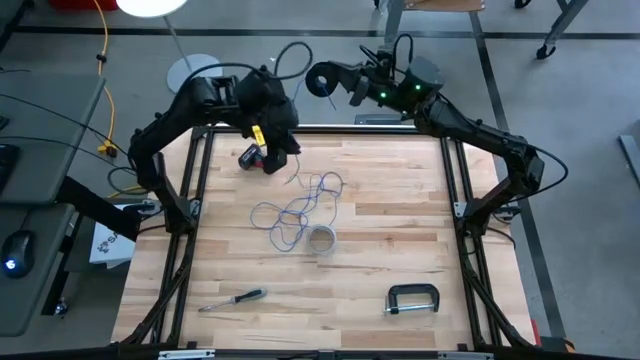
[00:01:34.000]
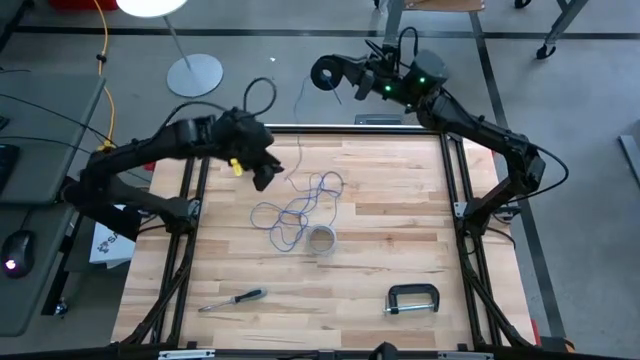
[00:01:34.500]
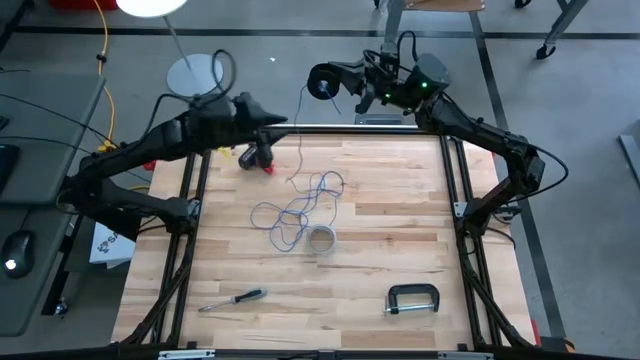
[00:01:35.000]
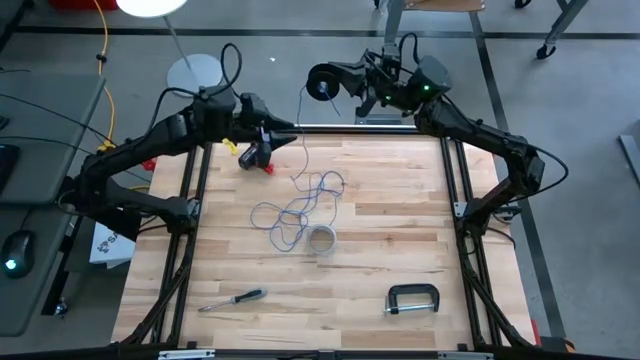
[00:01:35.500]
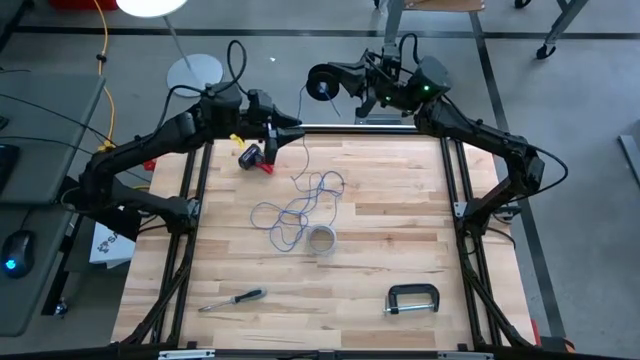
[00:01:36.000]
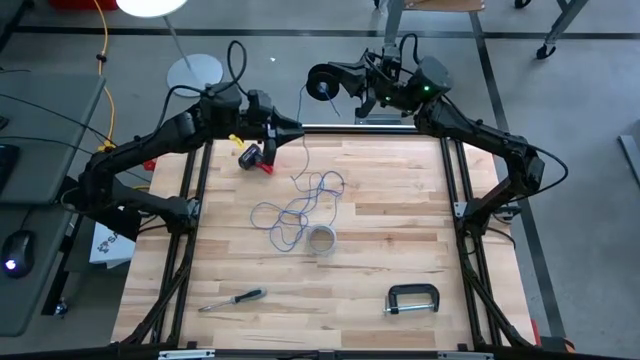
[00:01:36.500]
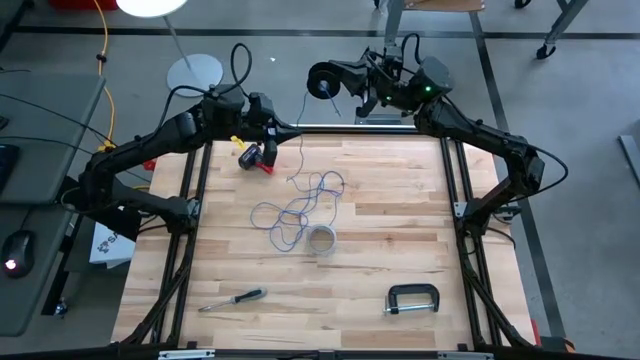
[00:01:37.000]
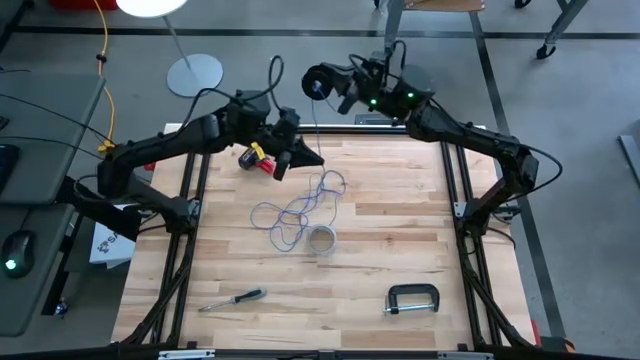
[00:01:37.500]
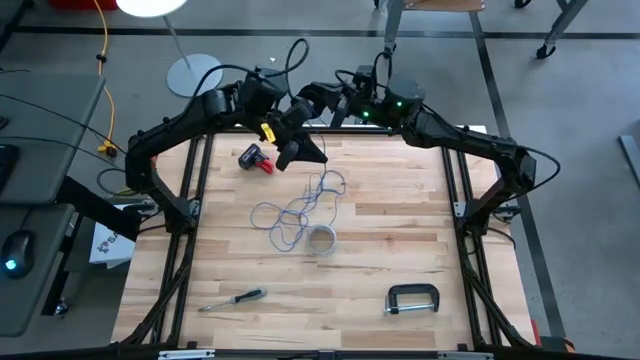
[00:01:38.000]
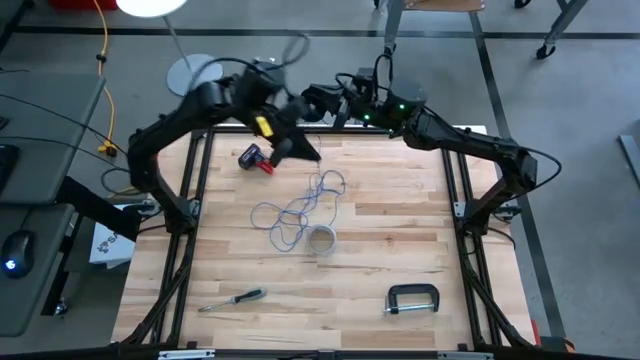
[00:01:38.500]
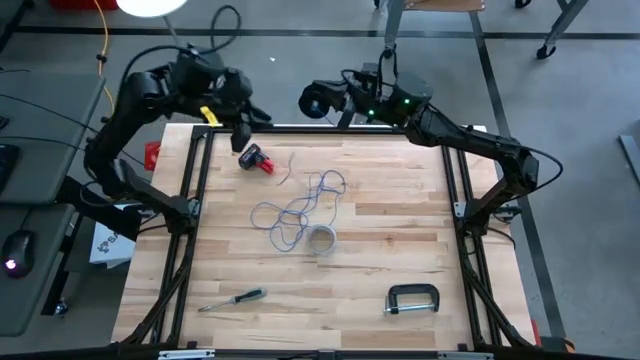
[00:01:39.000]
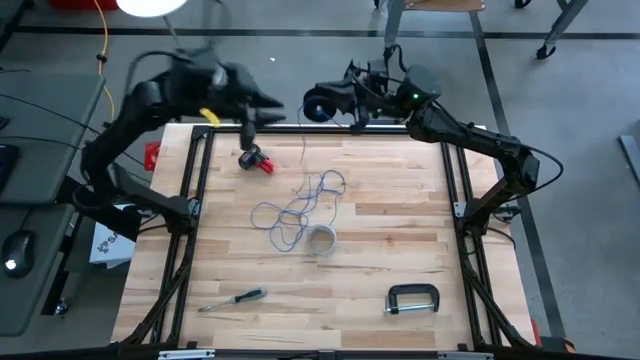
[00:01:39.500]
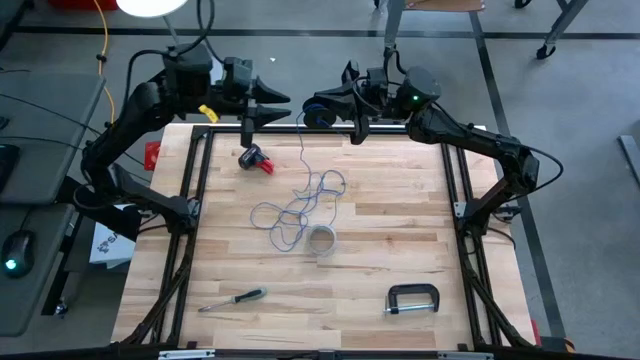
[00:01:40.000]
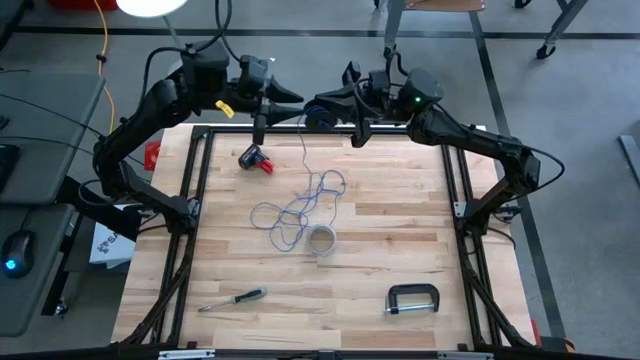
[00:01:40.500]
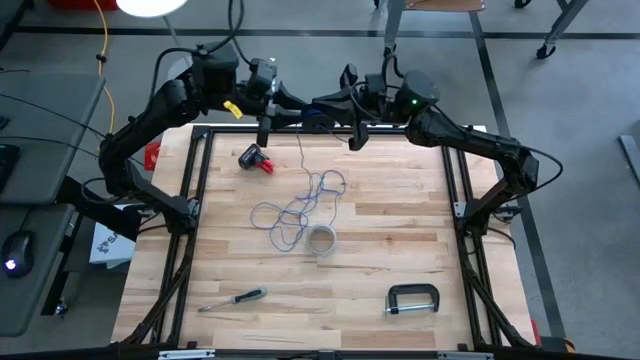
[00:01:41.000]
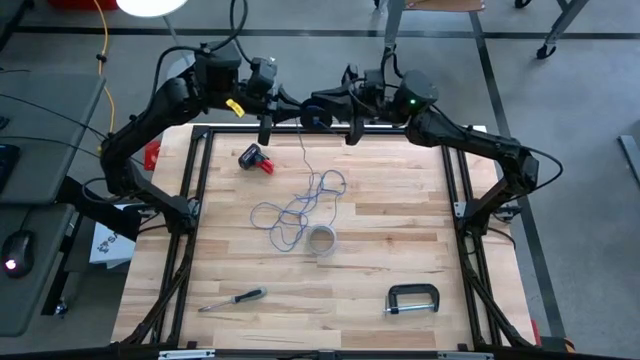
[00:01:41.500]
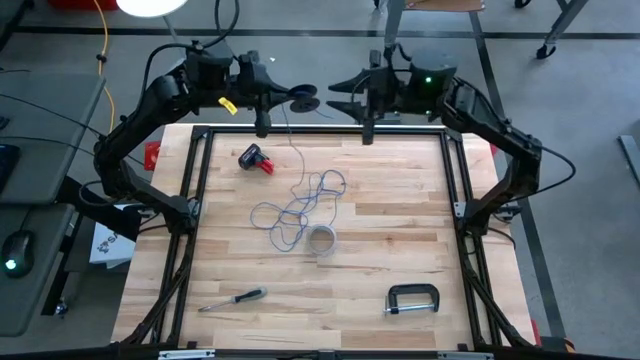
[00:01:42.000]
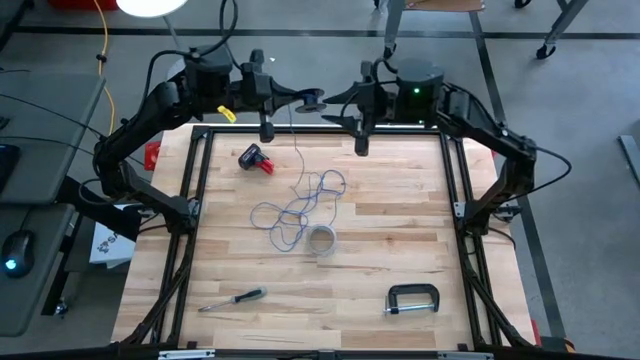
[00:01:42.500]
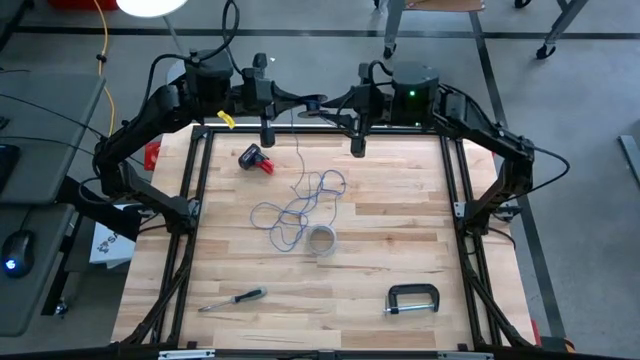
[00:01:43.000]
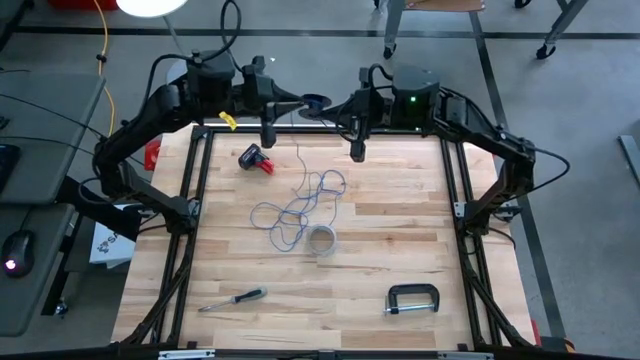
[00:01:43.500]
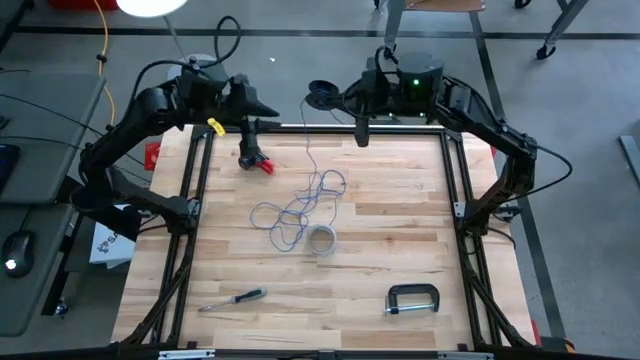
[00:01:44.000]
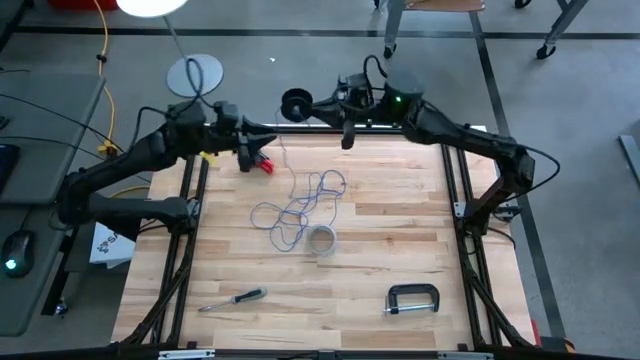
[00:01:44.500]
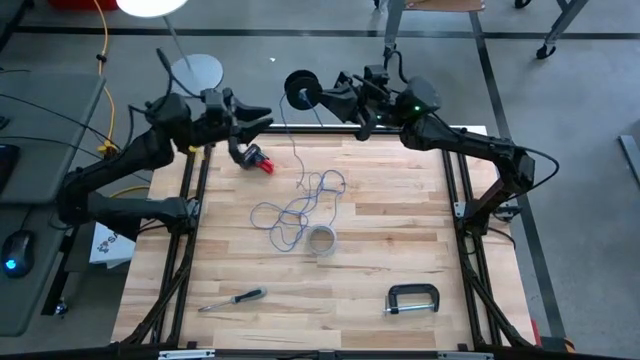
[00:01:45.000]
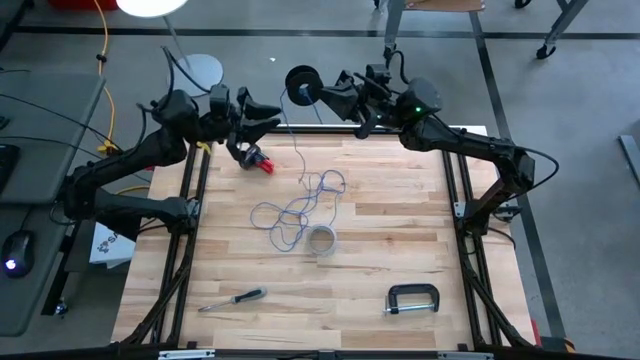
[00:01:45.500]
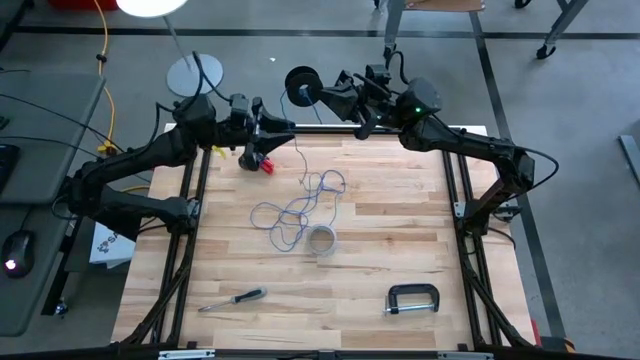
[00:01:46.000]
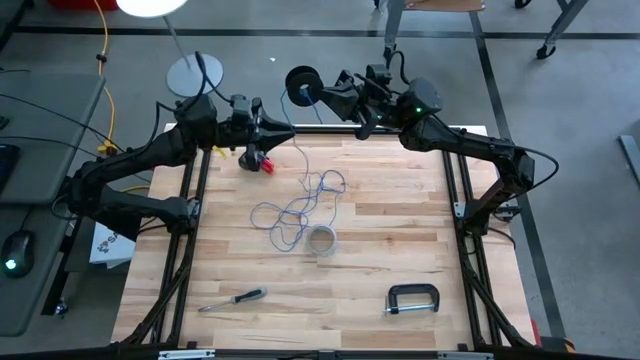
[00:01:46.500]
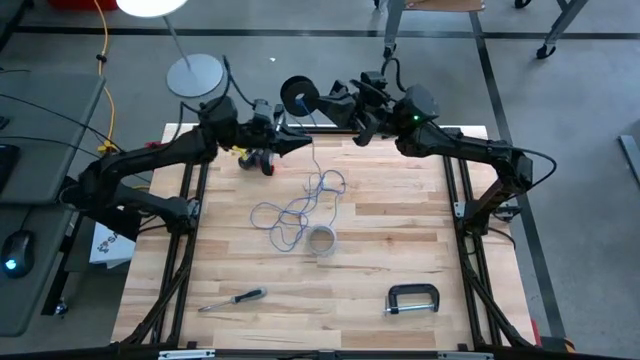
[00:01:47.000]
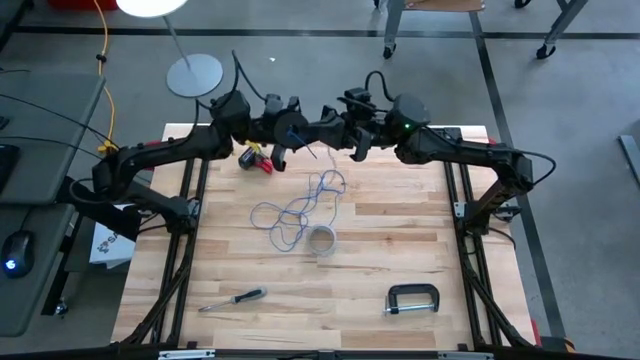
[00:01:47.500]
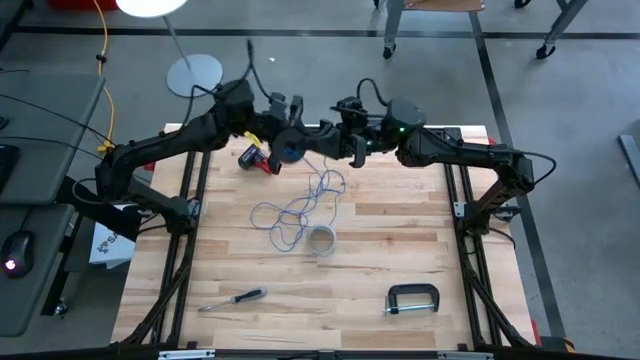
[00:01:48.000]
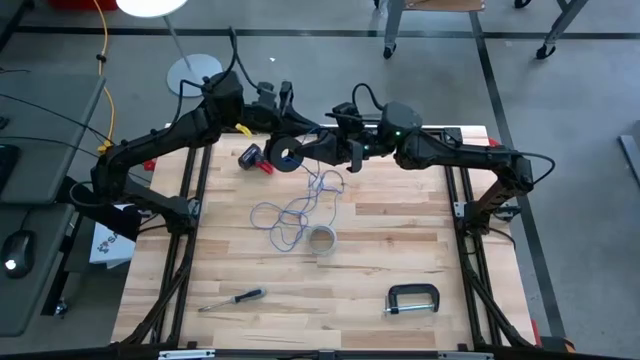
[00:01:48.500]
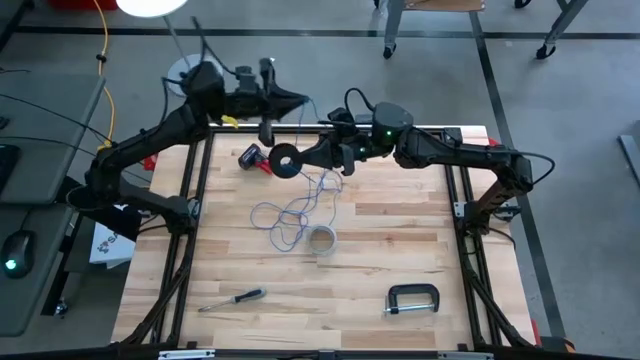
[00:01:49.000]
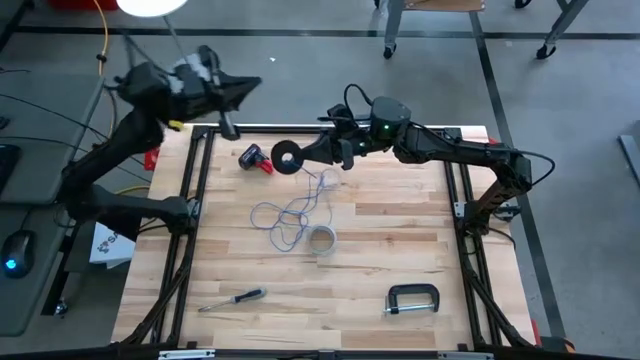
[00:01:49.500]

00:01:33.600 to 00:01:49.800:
Task: Coil cords
Coil the blue wire on the spool
